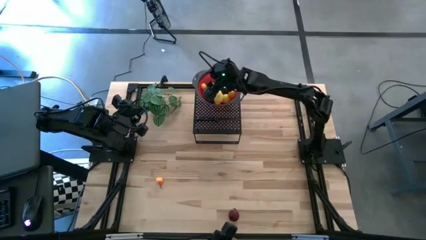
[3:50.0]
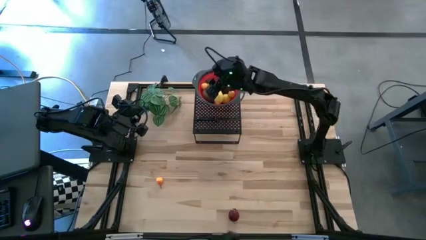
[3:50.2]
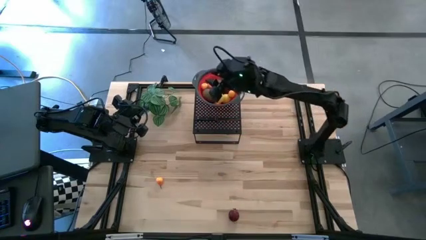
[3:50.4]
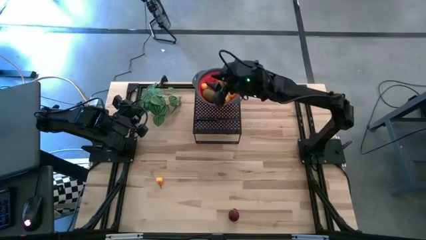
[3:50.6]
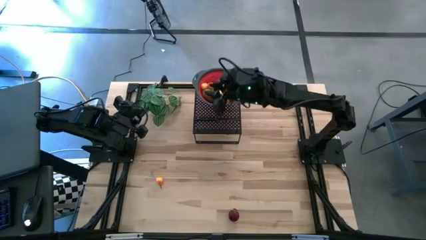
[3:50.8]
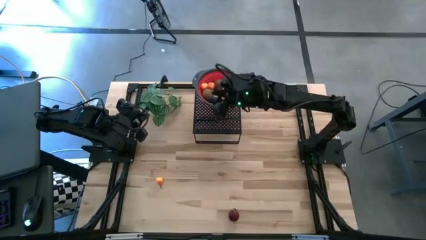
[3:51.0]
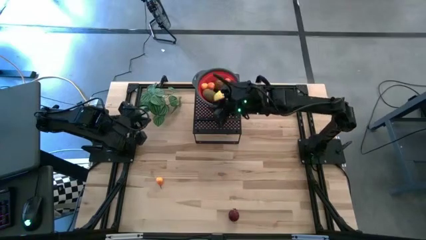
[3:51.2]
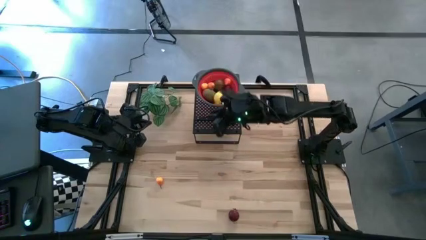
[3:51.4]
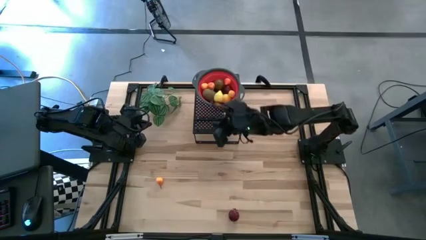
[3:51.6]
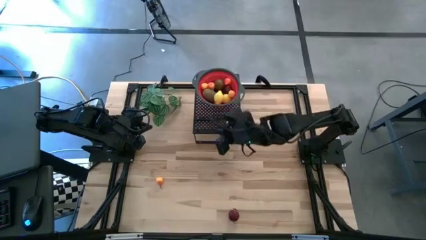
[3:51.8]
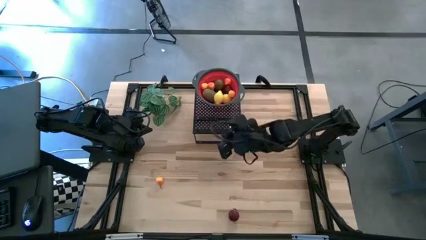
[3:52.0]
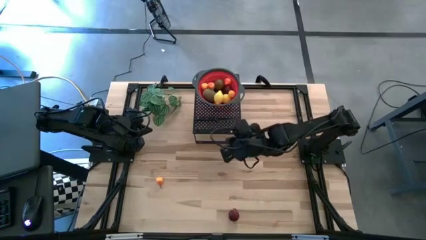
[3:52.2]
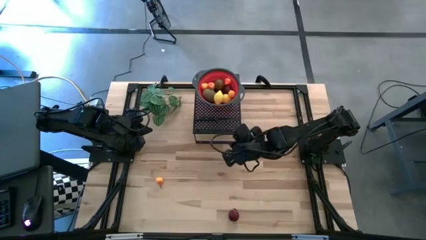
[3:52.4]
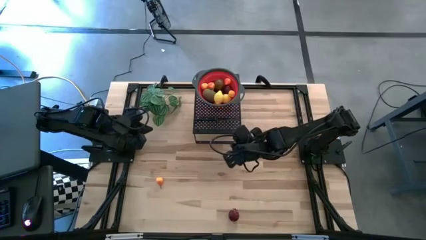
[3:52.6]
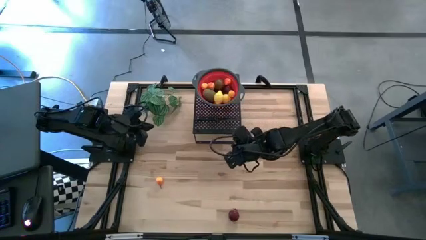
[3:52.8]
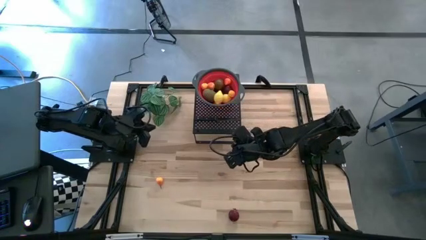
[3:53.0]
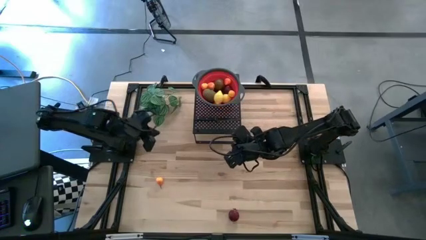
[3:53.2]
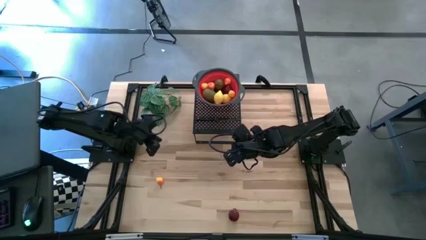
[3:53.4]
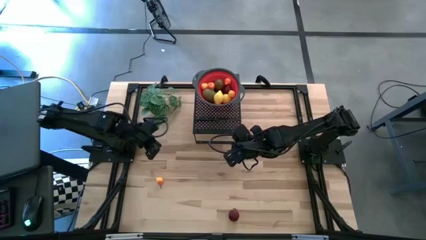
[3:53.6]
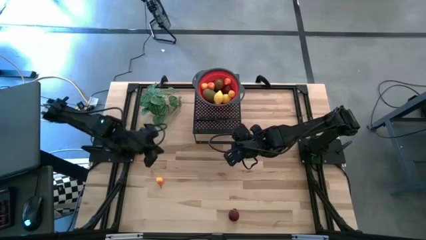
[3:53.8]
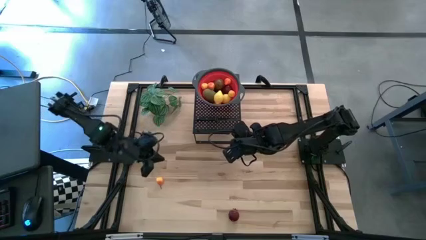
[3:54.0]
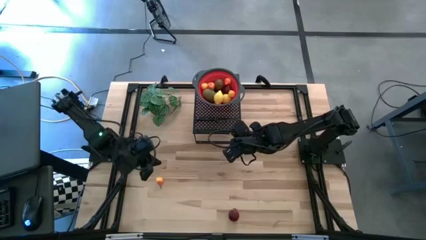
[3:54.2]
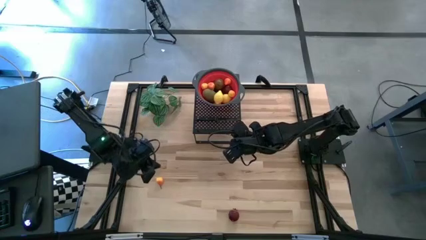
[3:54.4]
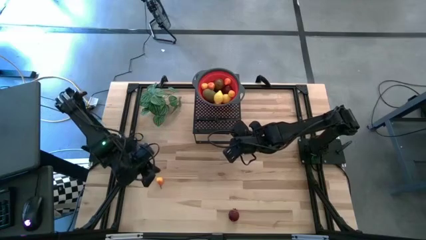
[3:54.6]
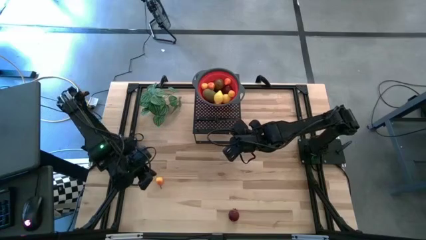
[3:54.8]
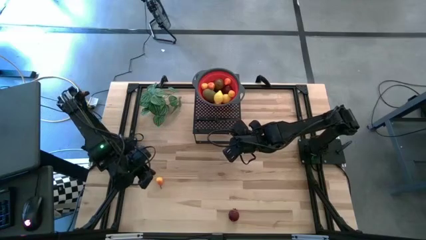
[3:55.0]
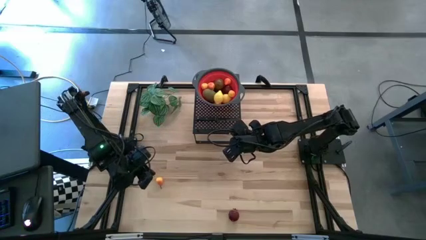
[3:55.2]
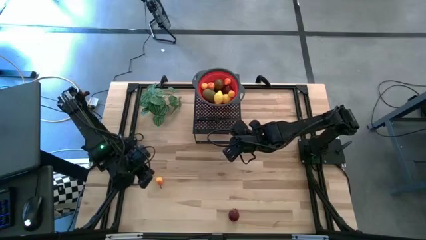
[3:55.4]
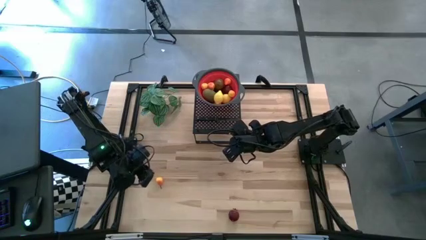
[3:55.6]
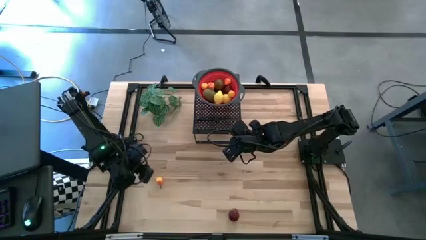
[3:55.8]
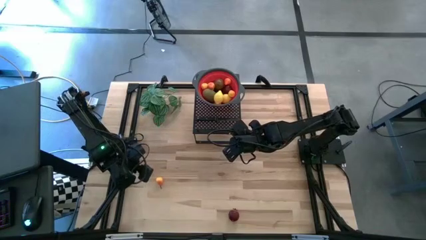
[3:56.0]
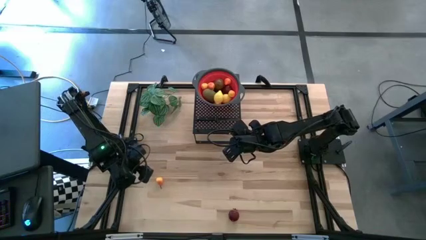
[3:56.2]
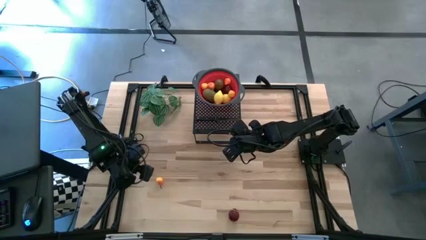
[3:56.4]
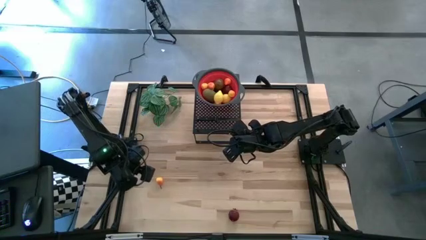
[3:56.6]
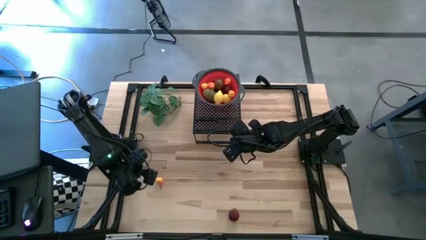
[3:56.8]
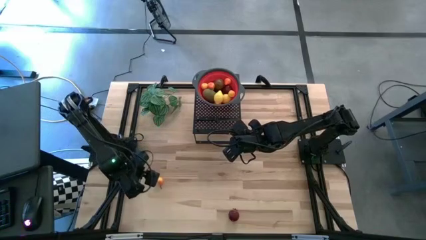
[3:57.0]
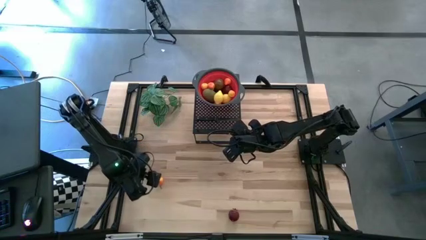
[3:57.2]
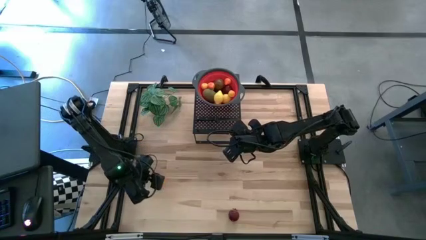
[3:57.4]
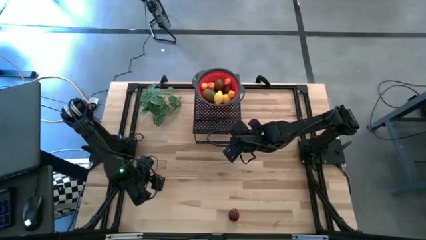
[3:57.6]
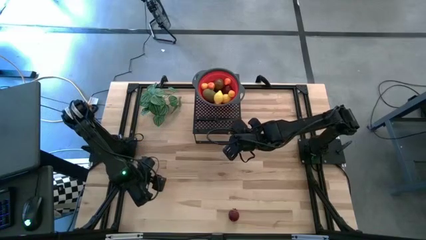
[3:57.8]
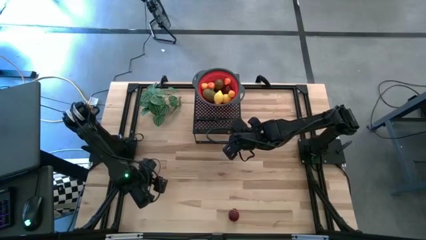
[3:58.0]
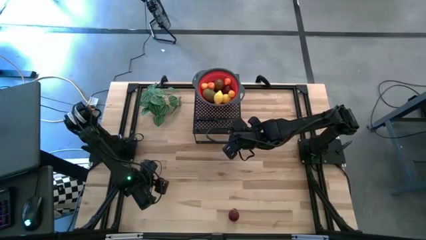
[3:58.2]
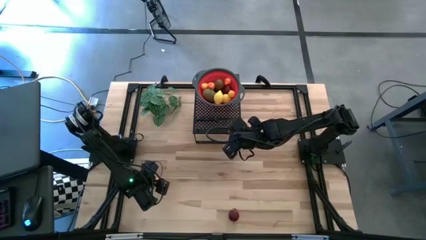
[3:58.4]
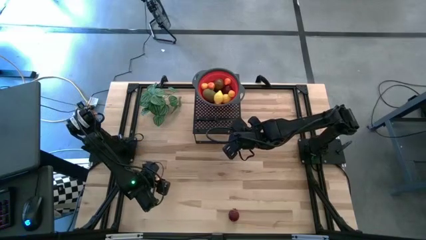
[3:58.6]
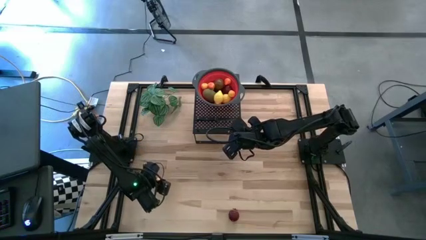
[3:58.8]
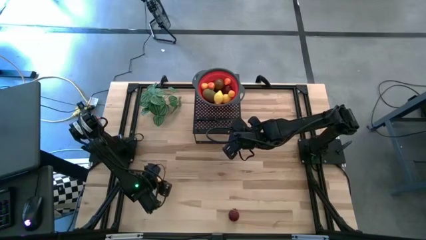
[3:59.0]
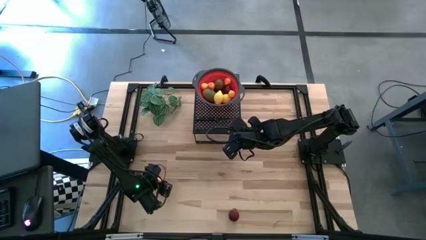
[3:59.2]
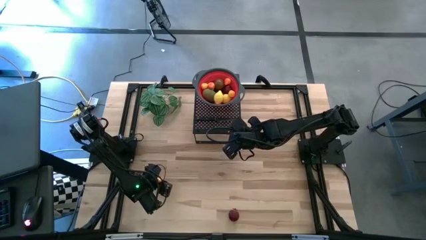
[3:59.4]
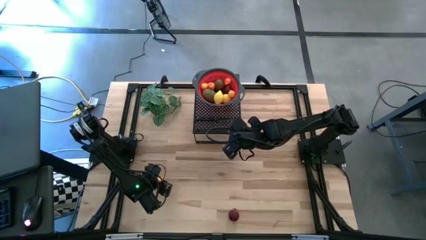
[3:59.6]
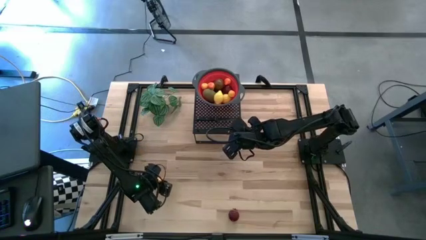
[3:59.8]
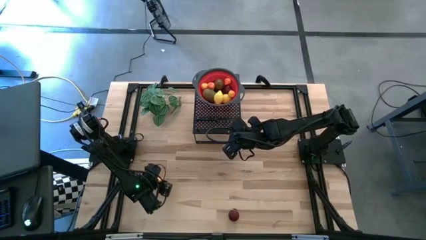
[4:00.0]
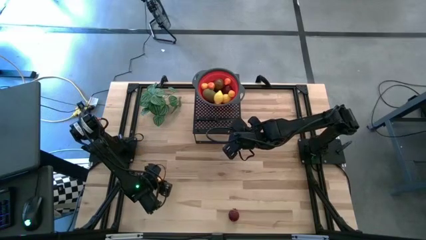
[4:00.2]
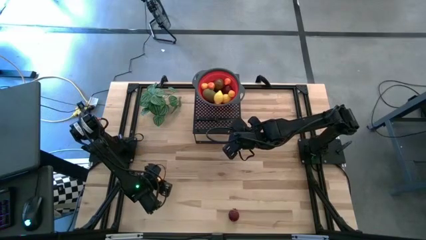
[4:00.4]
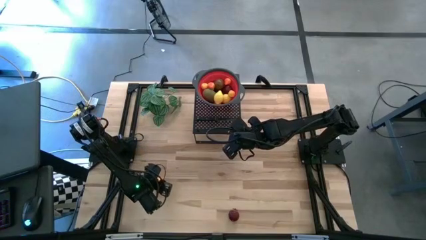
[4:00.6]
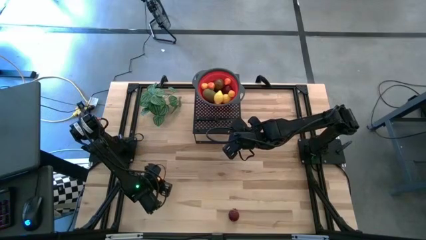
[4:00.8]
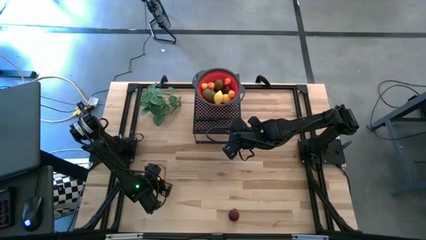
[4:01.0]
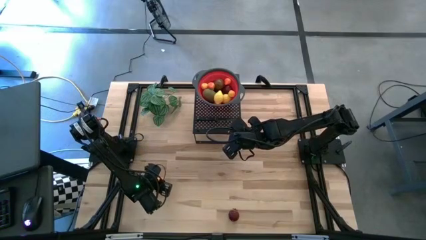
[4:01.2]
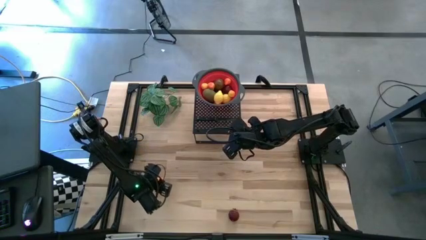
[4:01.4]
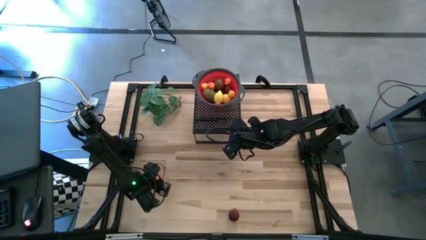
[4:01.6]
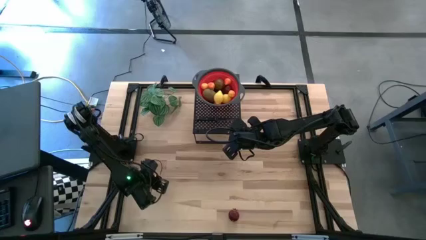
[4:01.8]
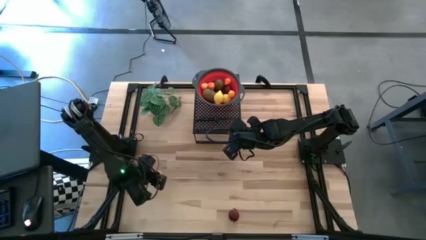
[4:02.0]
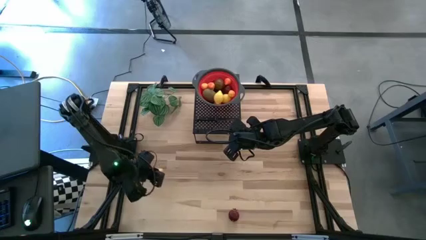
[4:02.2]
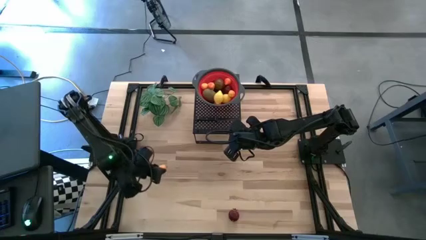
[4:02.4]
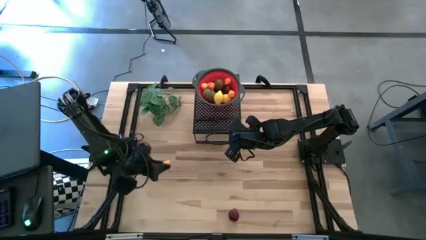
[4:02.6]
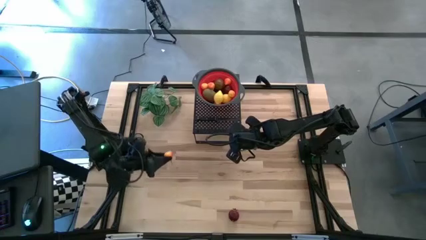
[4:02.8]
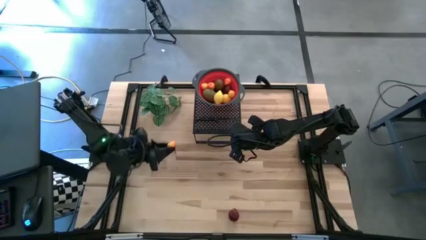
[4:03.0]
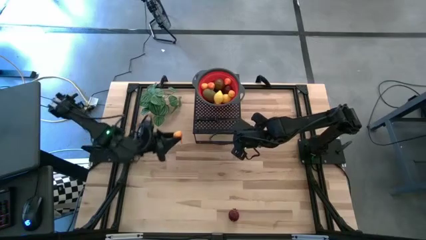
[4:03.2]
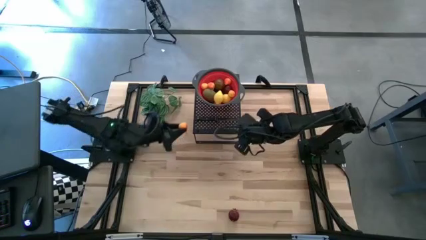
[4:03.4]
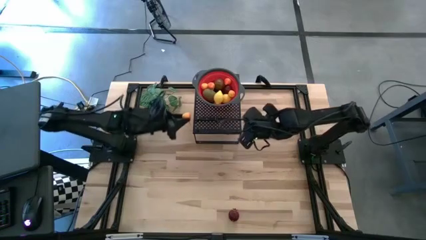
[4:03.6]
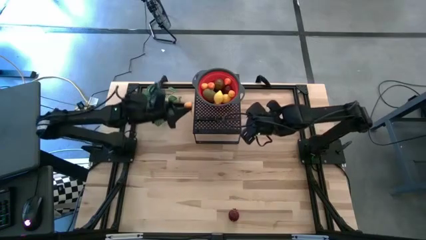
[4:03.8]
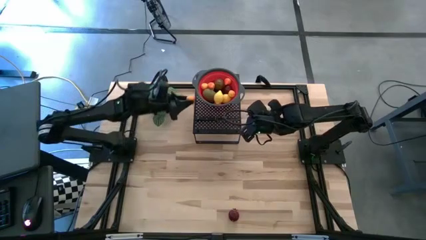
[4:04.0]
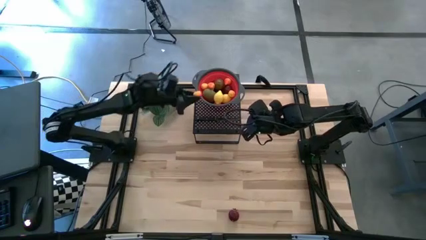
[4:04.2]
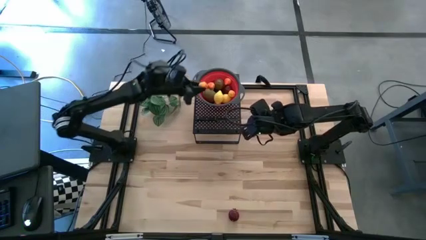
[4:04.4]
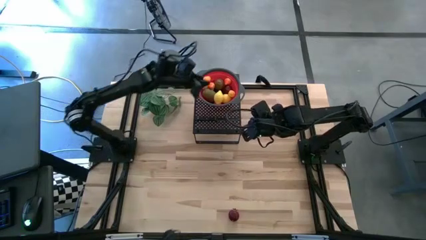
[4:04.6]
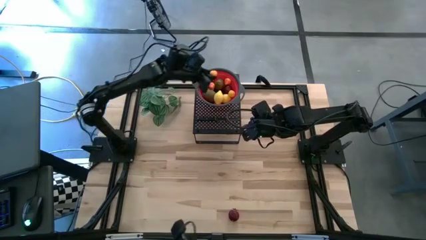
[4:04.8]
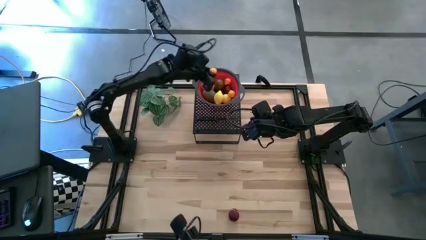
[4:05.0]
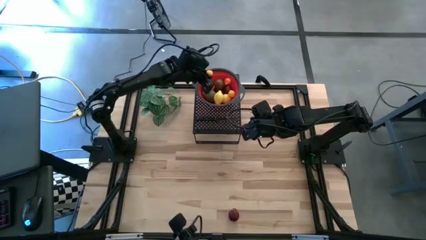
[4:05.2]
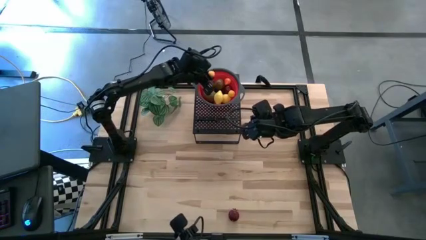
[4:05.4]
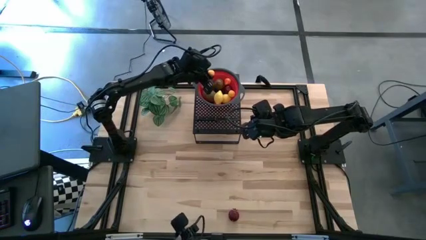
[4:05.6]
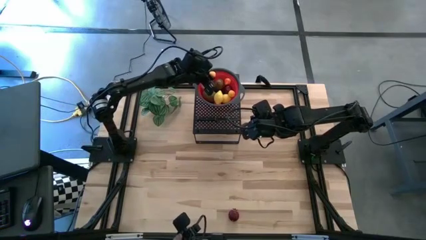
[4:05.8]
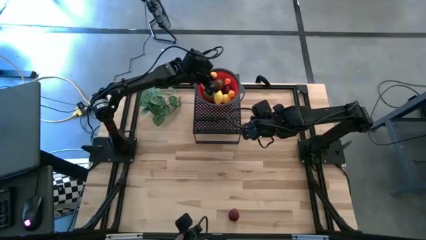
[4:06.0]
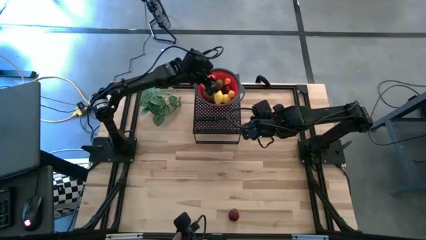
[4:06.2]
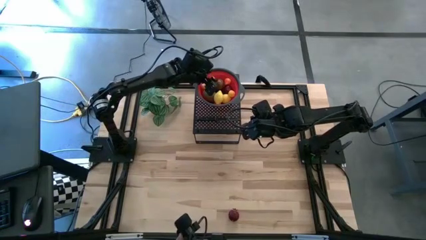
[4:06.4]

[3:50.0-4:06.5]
Task: Pick & Place Fruit
Put the pear into the red strainer bowl
